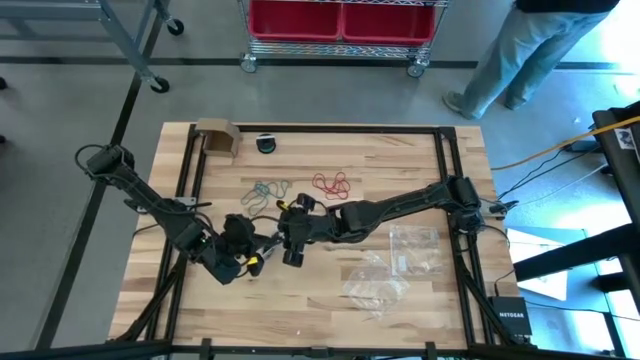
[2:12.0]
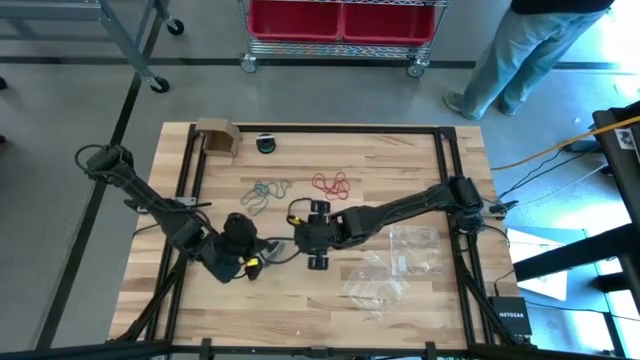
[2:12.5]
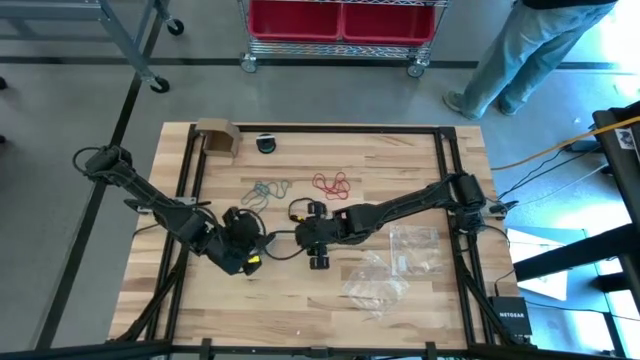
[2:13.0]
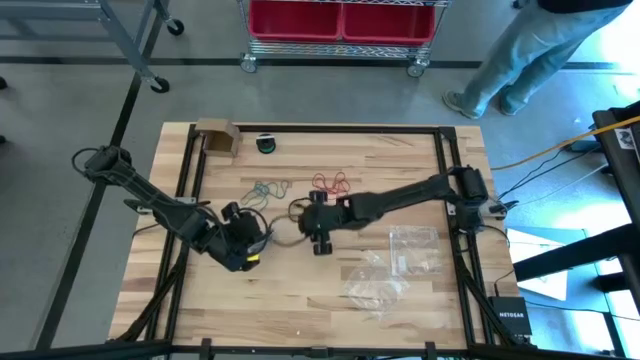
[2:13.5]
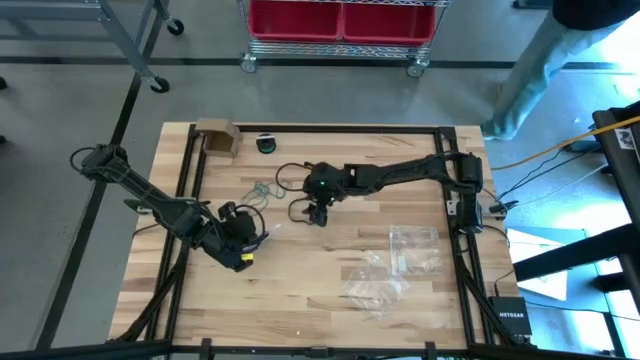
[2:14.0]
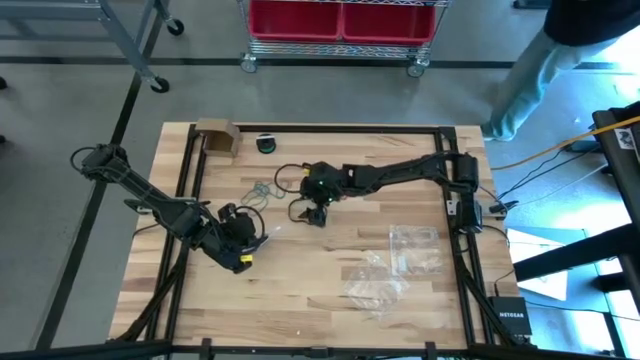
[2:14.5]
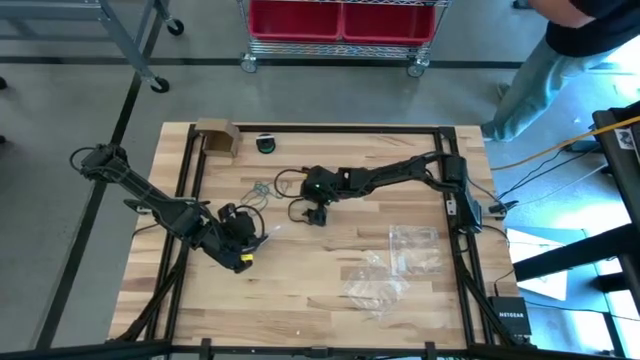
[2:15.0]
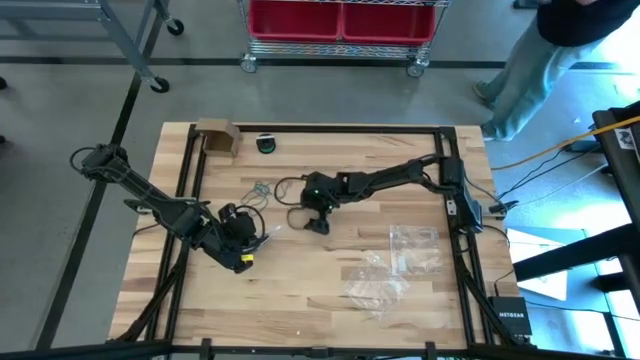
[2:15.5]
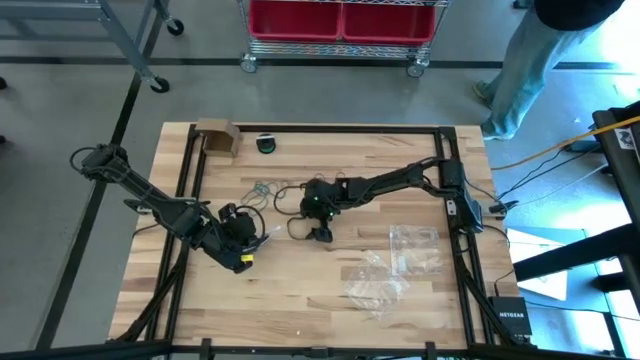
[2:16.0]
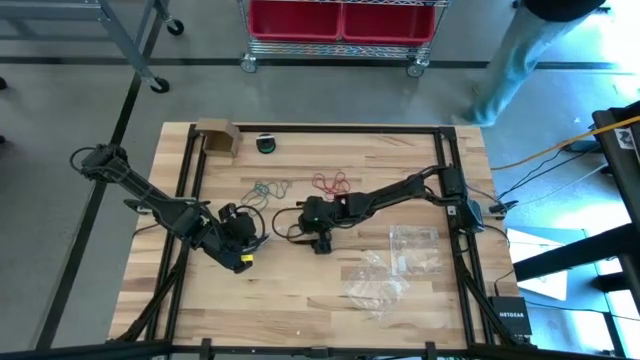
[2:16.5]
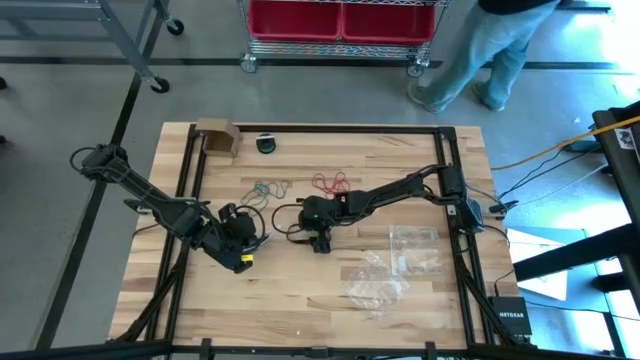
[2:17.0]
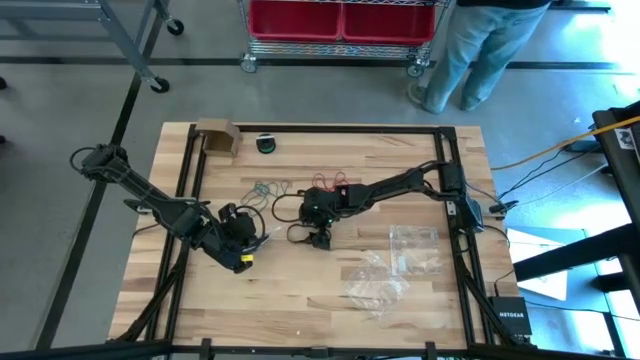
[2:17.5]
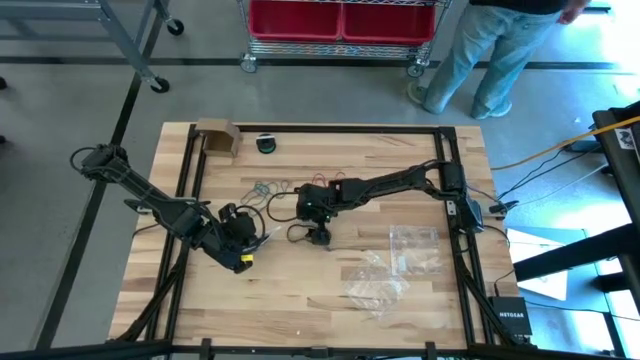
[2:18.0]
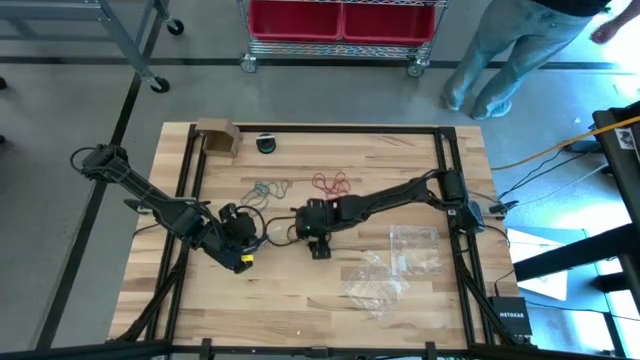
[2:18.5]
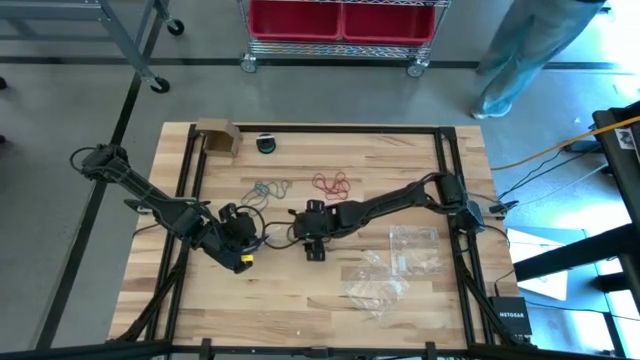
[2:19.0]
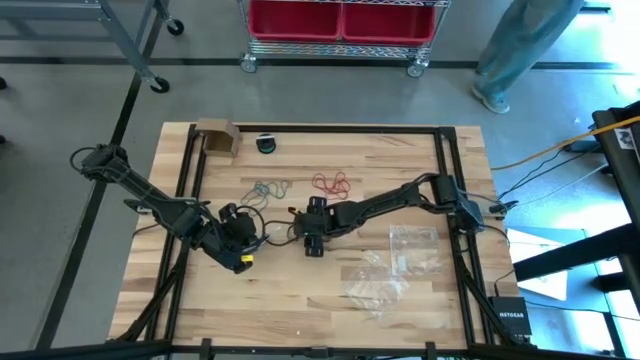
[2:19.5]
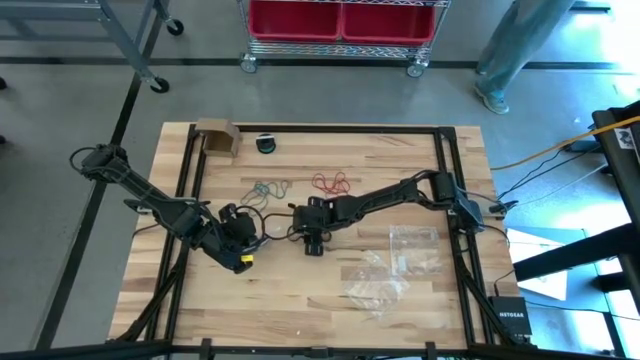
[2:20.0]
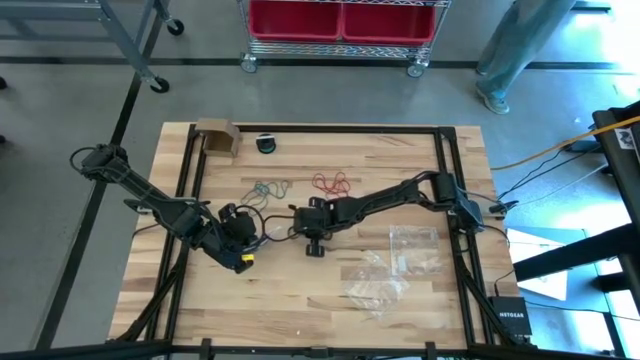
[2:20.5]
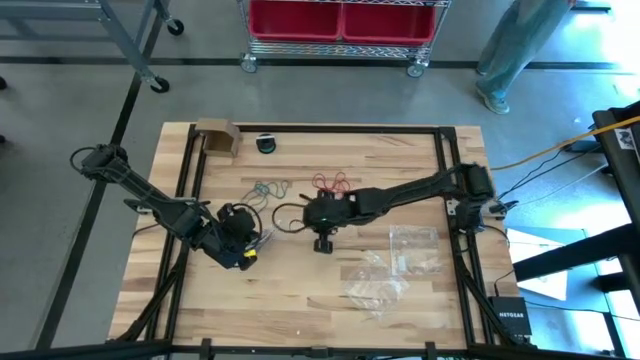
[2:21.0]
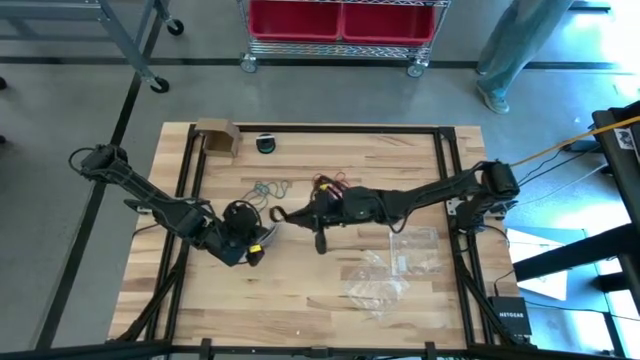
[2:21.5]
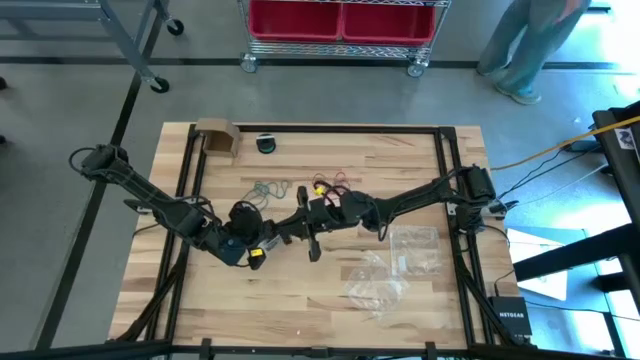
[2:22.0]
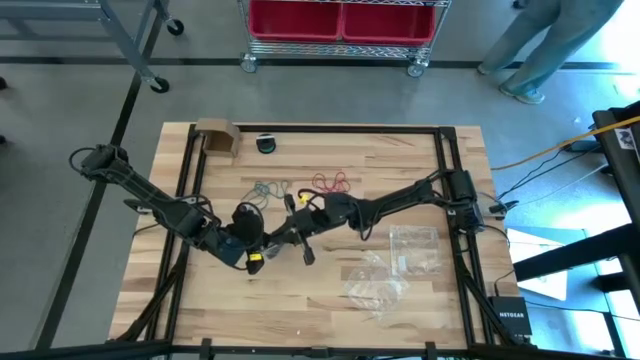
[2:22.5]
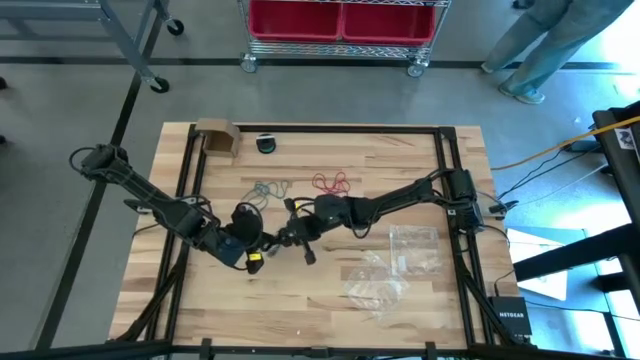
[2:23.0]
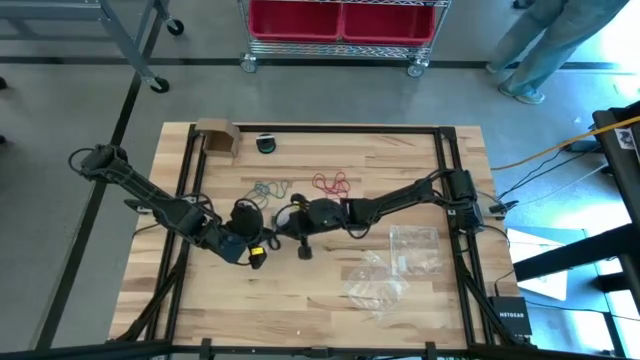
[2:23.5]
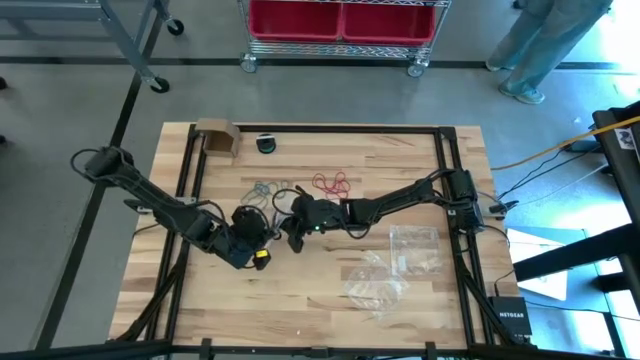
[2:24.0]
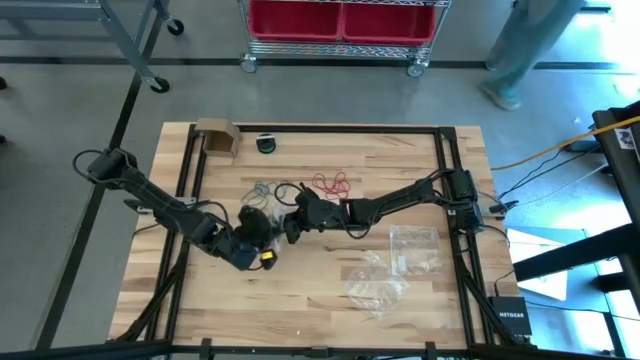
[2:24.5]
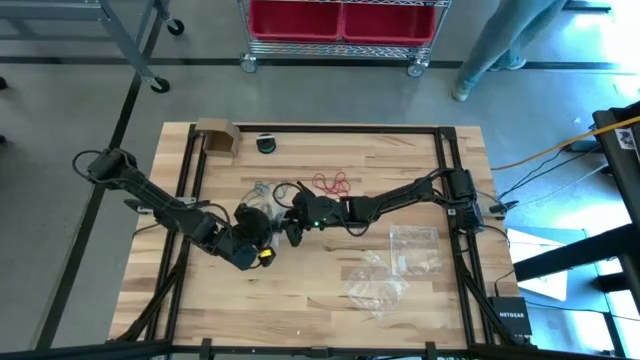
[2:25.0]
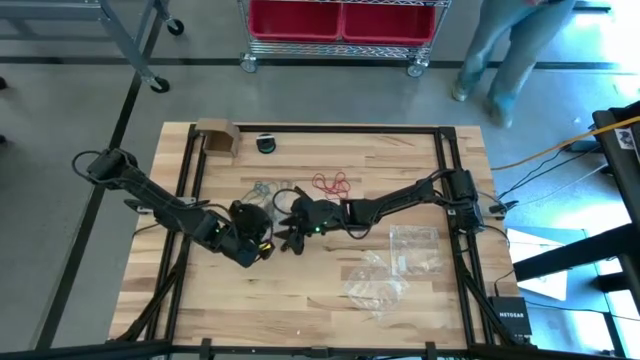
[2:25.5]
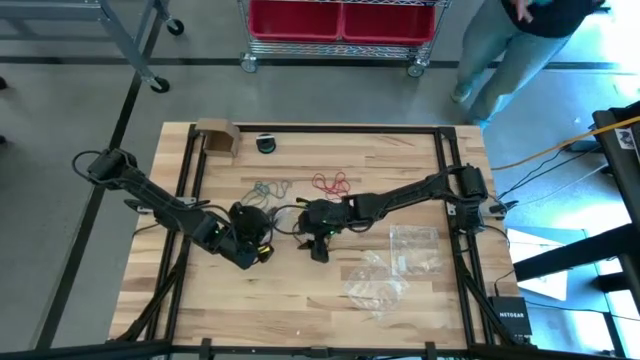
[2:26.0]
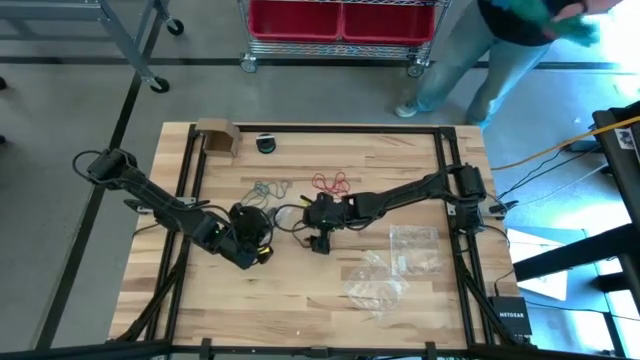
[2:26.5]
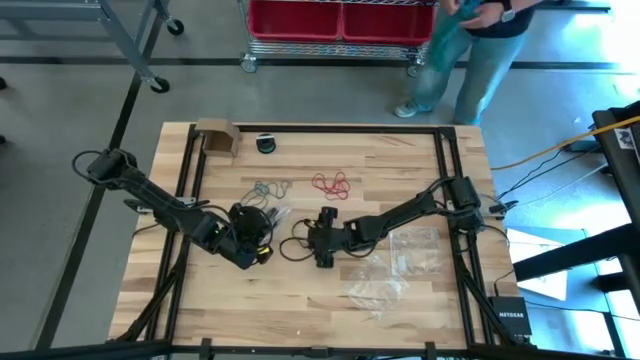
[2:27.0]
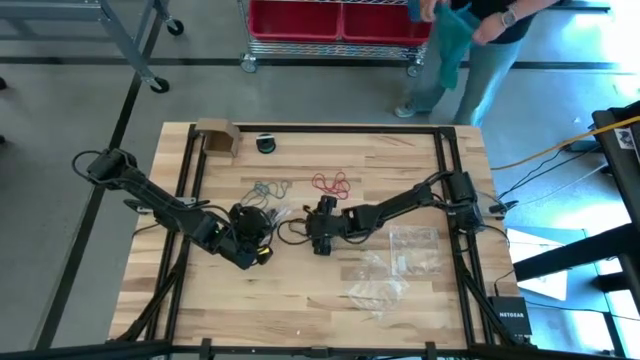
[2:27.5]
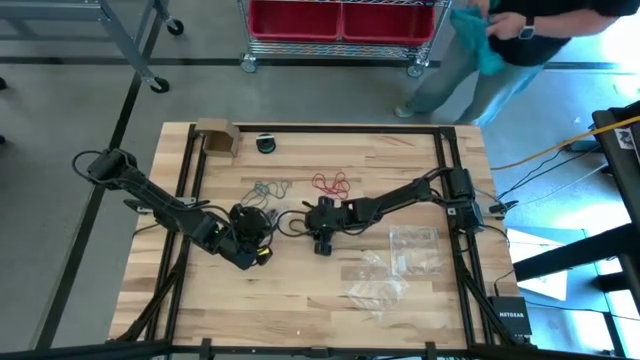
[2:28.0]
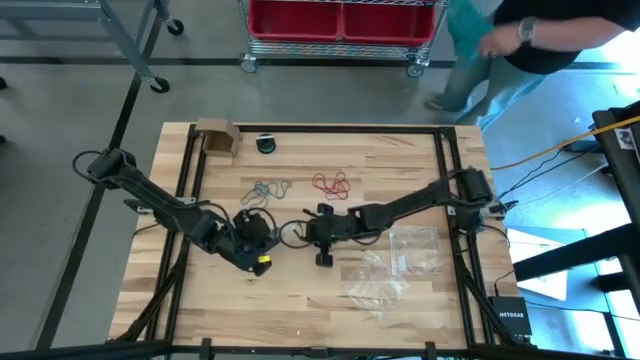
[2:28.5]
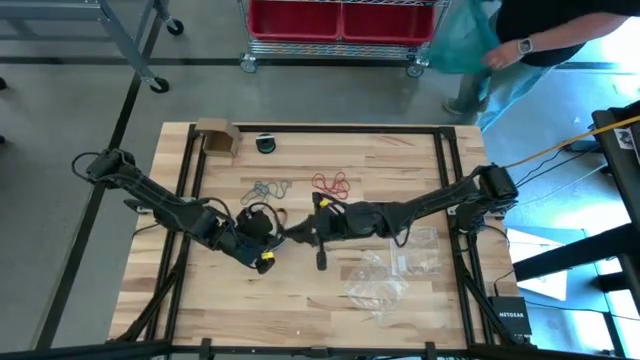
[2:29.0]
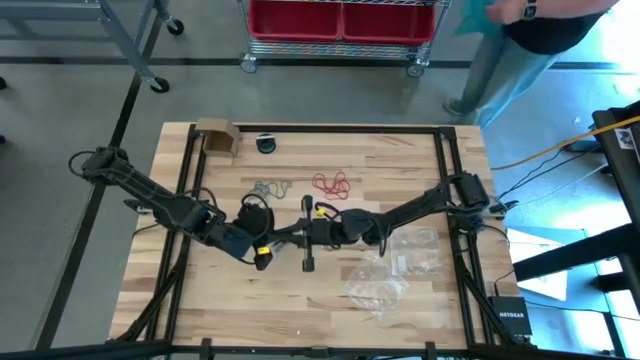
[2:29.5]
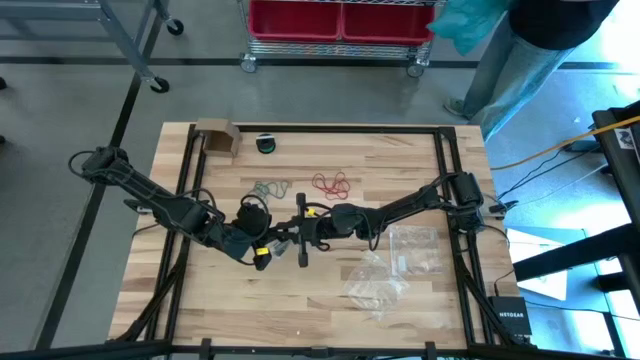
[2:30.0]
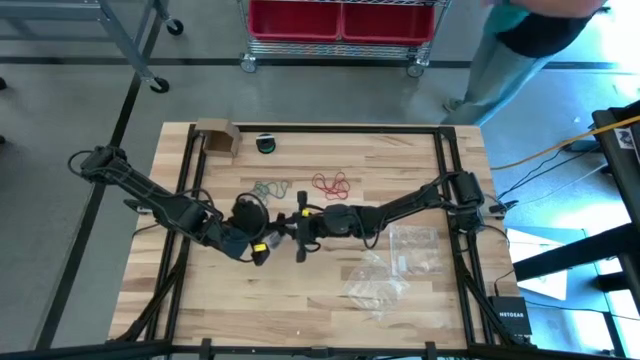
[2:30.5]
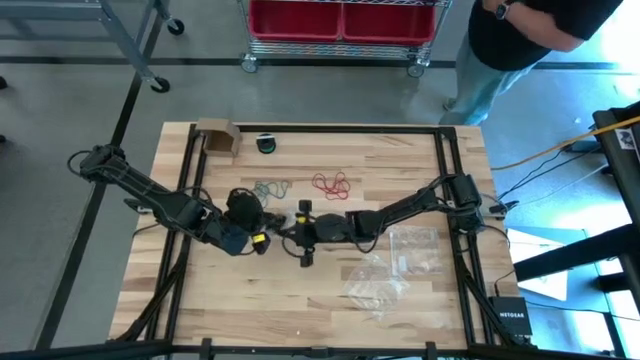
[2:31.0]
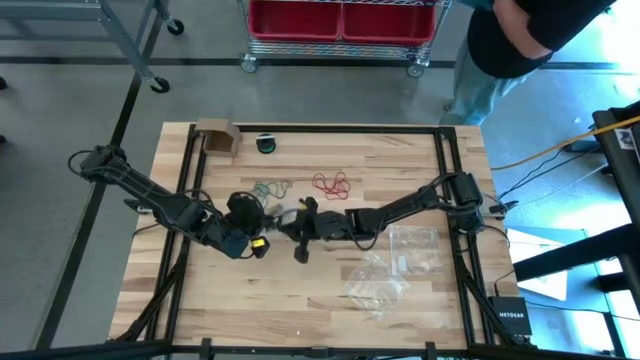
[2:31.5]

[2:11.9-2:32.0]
Task: Sort rubber bands
Put the black rubber band into the transparent zip bag

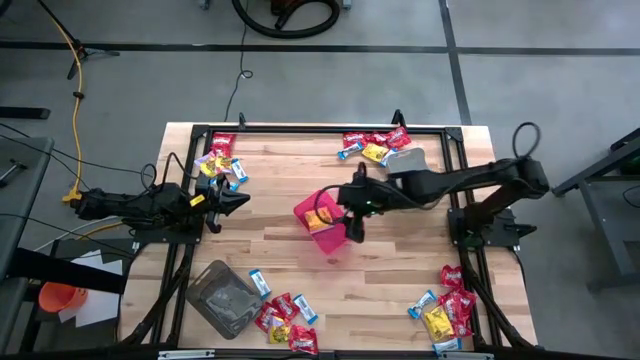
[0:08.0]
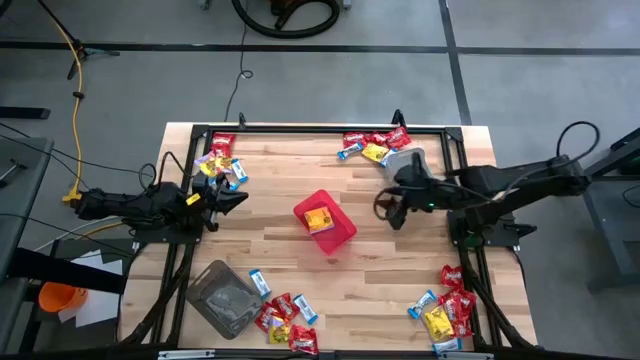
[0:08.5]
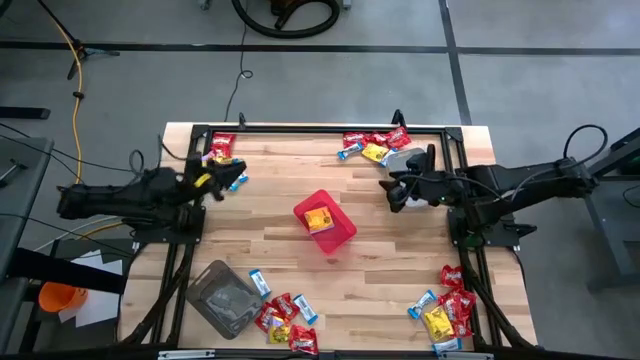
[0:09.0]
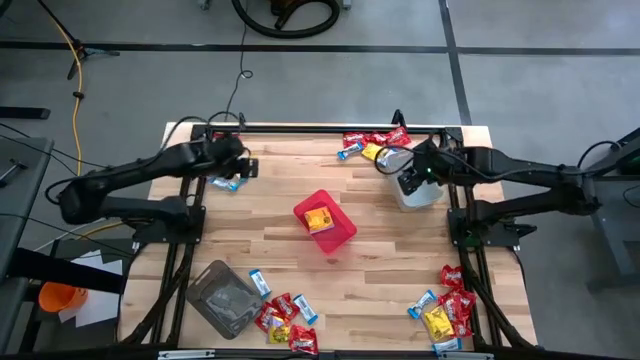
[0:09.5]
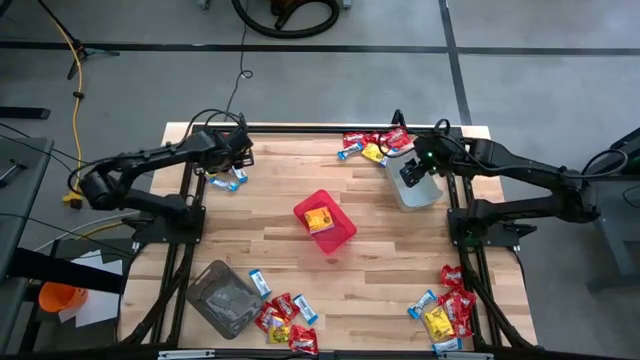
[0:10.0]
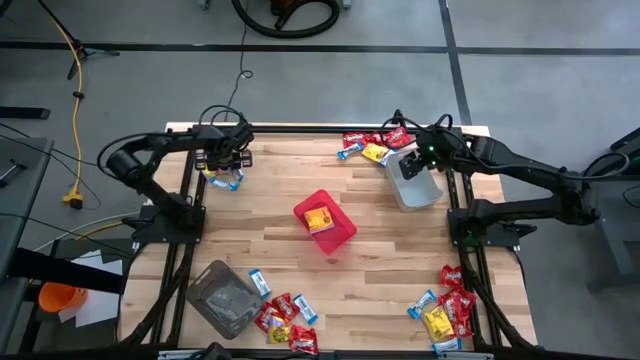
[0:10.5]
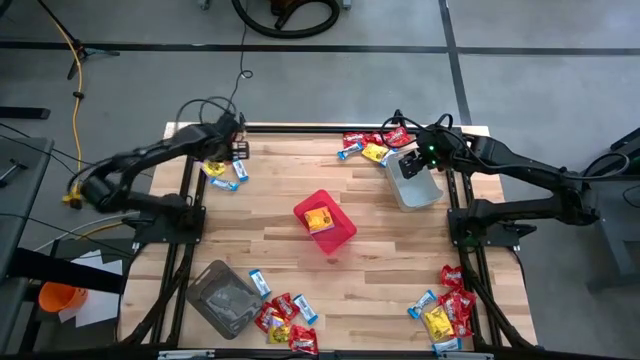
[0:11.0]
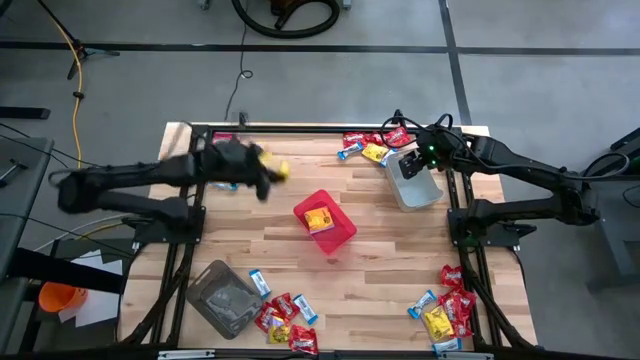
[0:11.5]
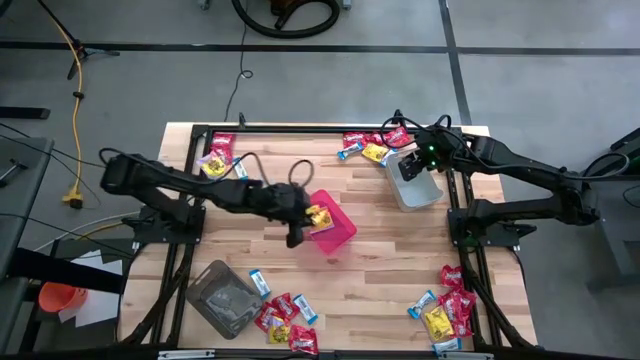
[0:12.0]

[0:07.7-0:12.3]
Task: Sort candy
Put the yellow candy into the red bin
